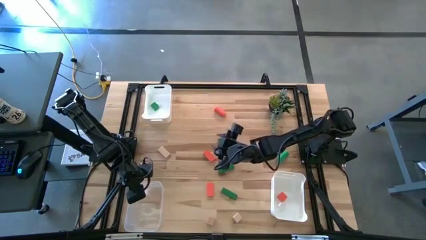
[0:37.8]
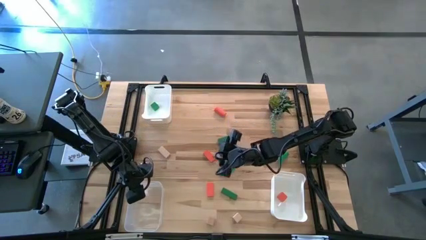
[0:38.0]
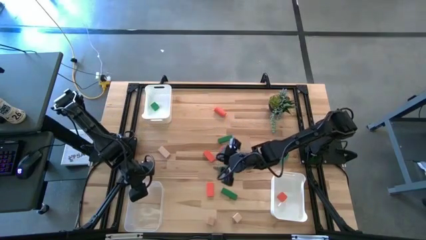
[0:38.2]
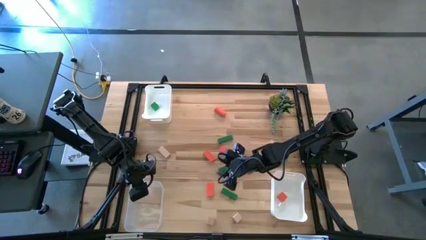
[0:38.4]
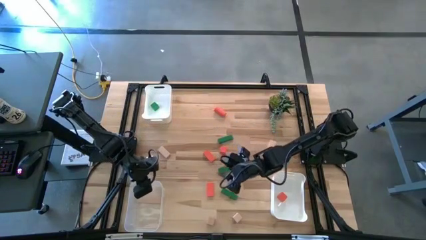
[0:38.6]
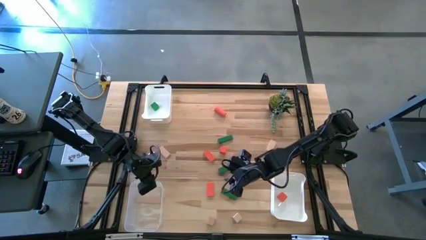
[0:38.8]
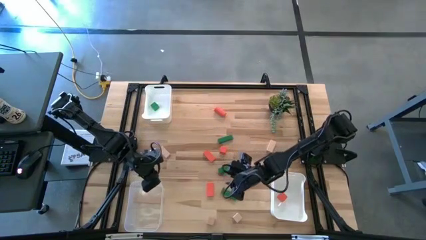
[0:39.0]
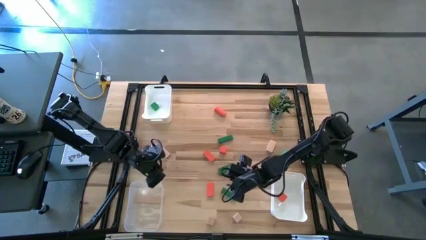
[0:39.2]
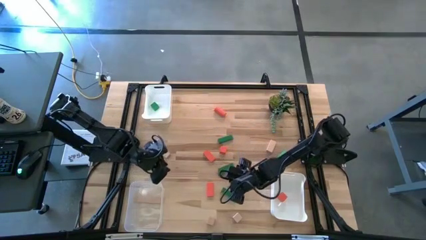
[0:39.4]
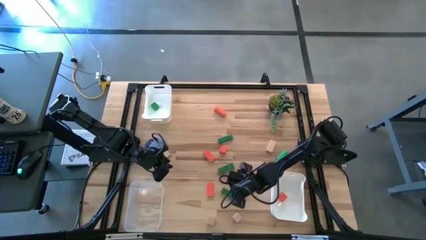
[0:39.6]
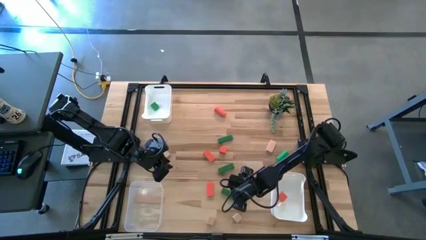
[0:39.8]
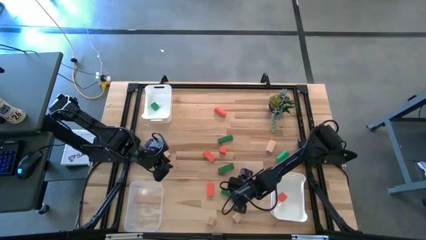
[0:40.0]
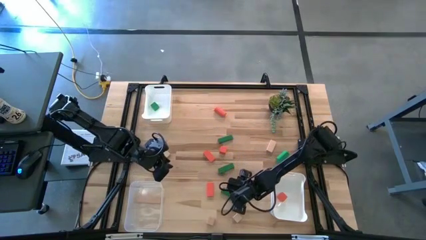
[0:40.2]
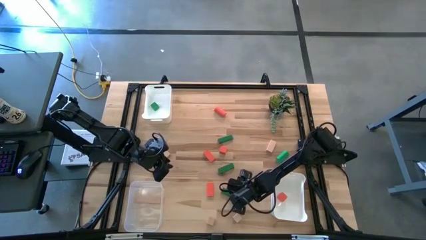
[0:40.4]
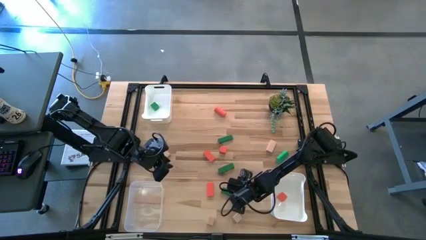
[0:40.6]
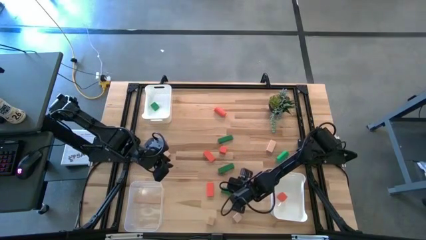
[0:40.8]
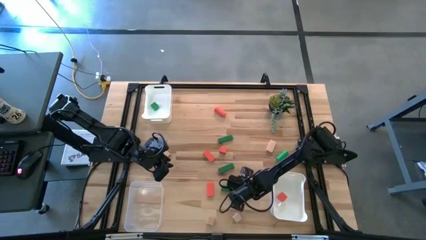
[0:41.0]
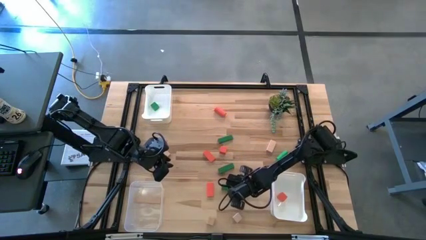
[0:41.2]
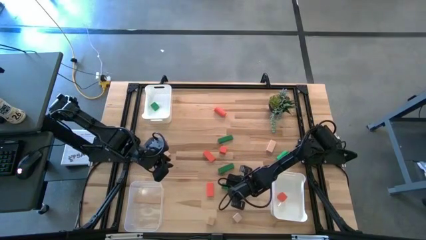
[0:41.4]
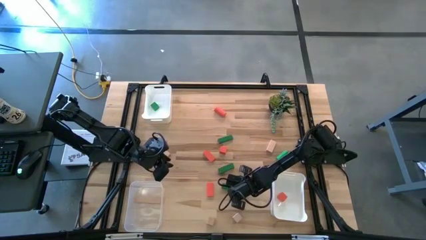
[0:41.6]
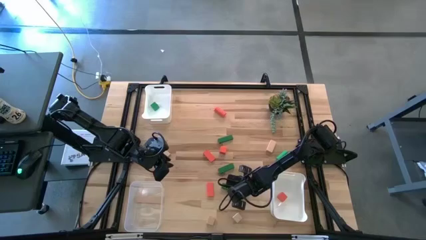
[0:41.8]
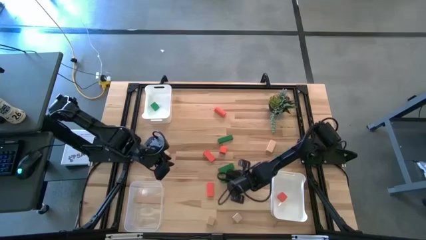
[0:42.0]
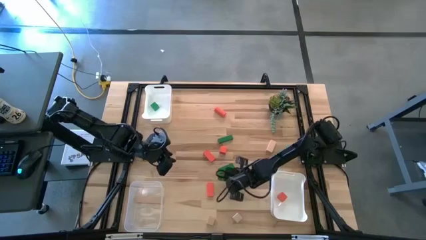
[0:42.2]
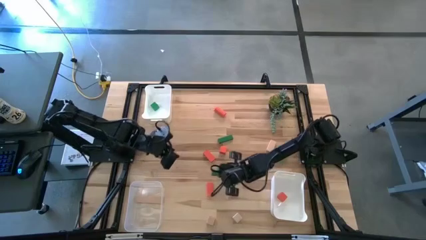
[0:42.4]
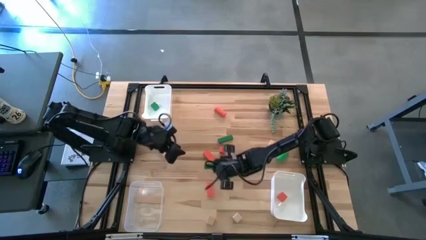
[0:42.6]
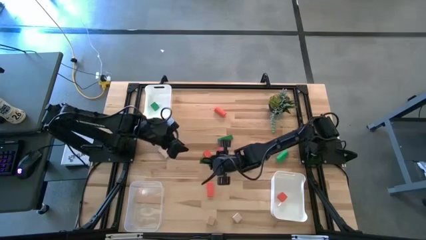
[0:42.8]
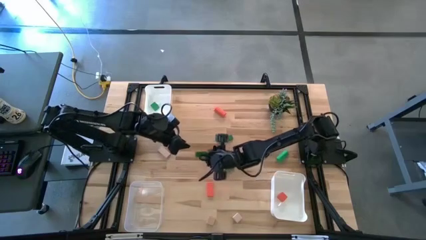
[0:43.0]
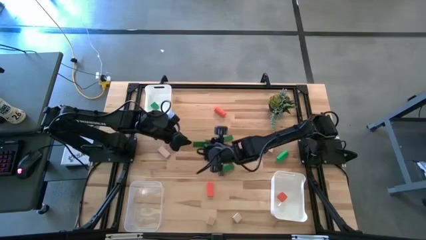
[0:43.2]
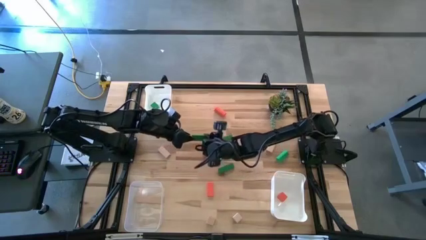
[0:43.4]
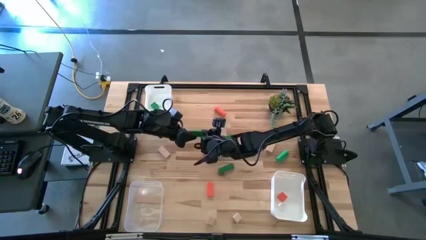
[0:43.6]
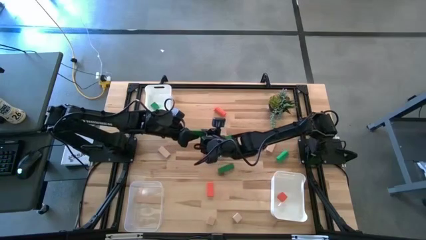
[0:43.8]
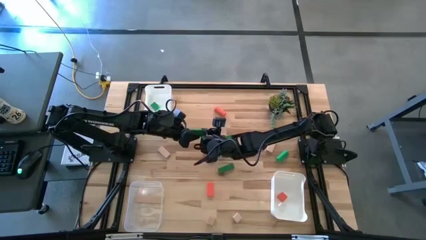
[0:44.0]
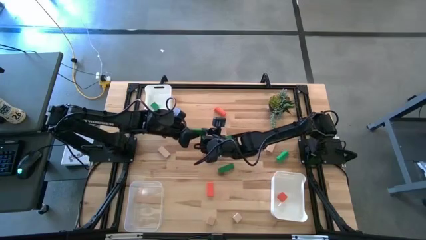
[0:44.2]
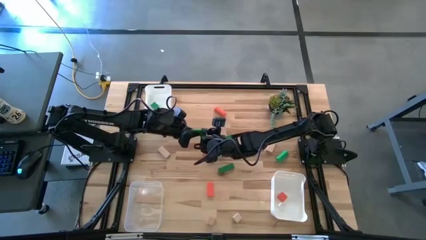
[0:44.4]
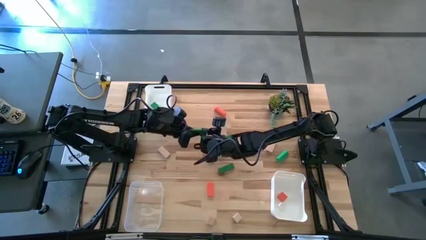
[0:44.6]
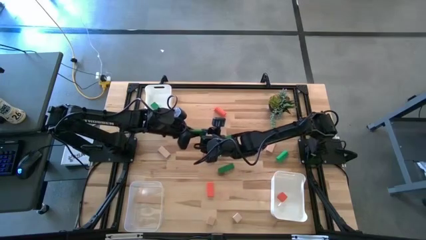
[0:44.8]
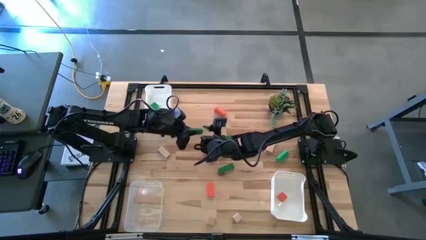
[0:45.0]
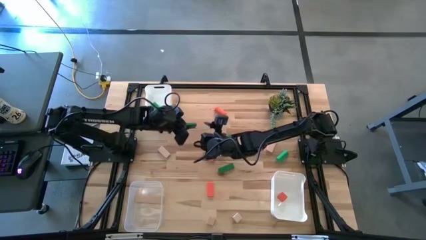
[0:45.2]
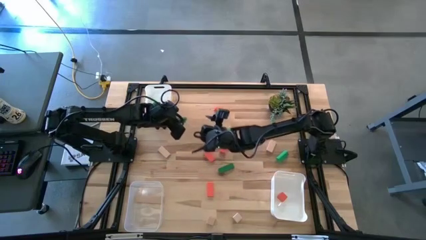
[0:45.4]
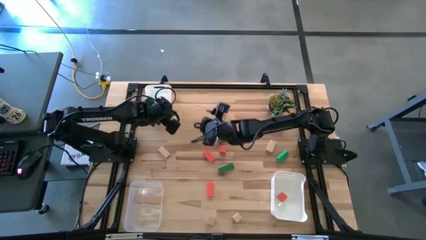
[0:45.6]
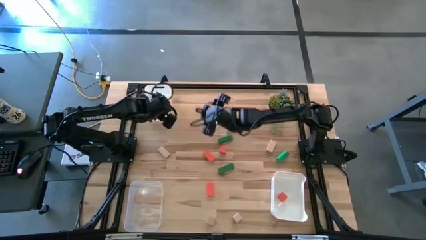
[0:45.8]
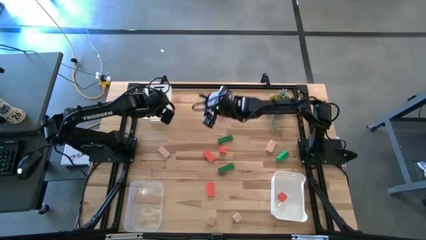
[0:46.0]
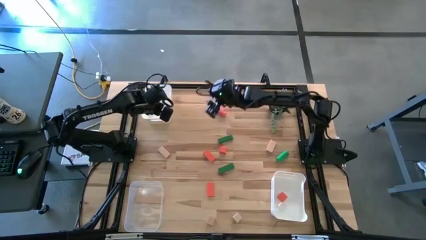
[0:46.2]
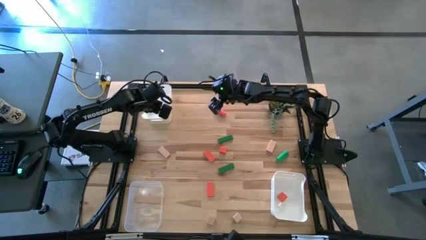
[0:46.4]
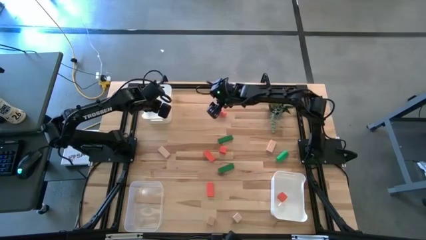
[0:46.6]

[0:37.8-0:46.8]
Task: Sort & place blocks by color
Put the green block into the top white bin

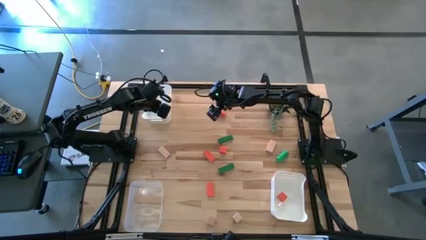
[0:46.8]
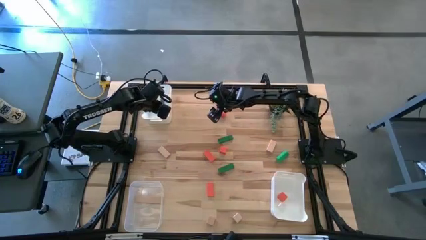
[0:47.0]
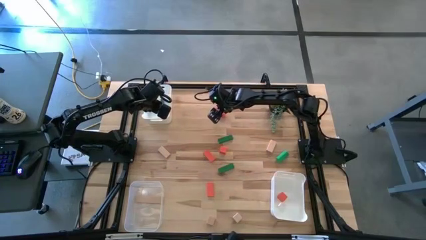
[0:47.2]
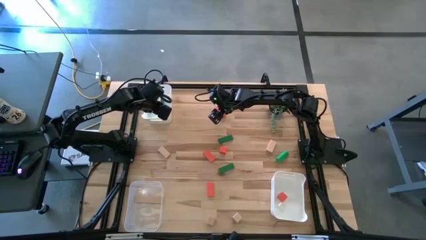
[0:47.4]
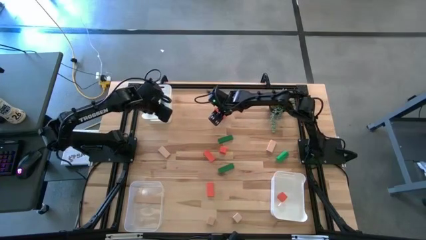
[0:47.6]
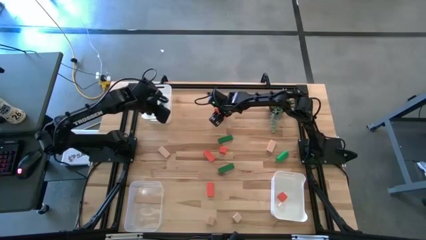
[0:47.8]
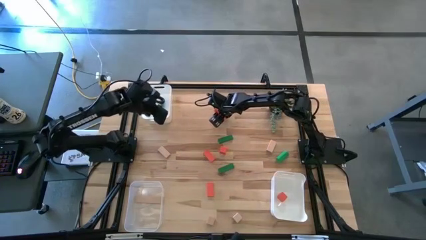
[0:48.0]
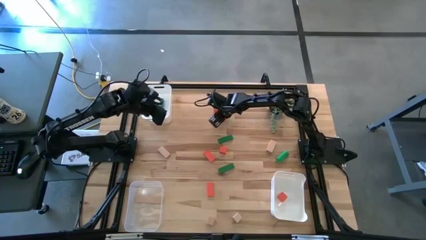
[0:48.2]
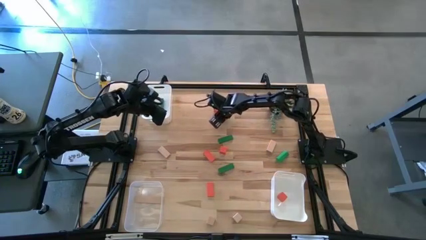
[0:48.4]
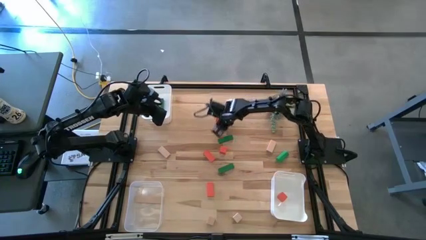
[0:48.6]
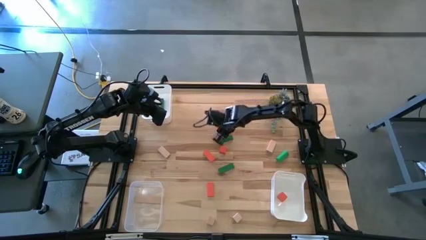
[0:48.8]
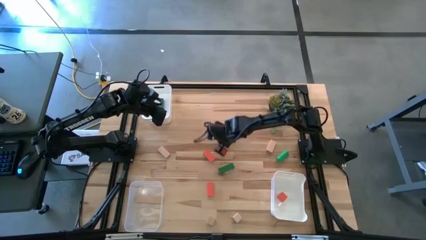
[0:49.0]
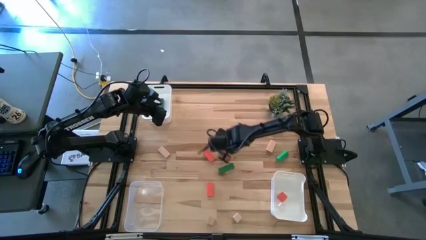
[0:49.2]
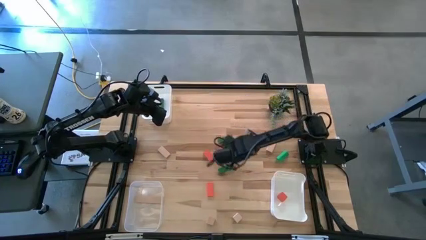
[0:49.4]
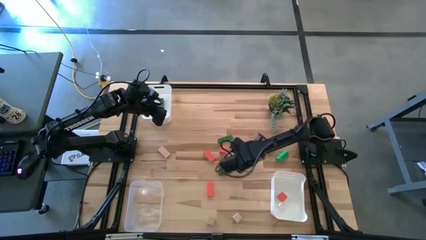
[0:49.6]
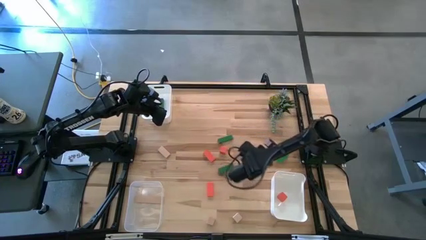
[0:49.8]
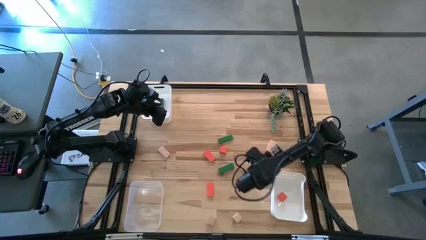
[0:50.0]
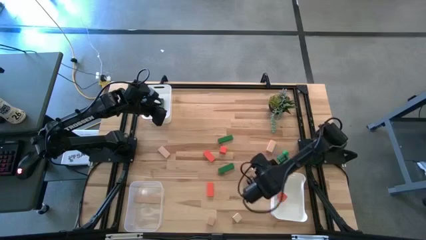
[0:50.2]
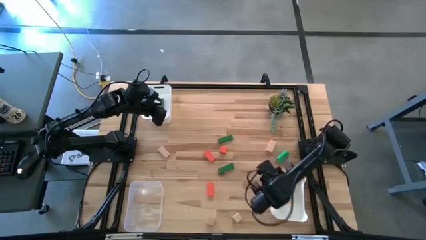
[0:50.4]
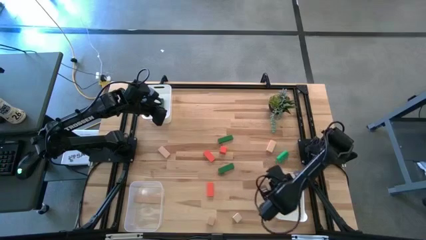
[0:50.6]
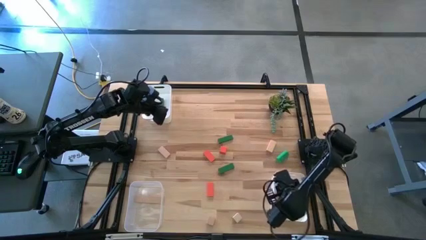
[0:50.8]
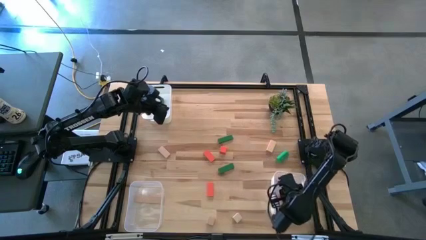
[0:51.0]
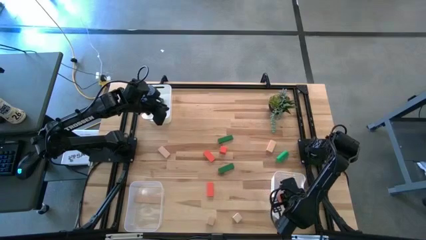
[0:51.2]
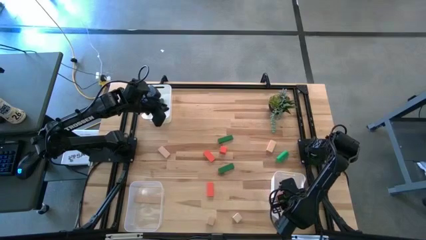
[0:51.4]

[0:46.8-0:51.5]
Put the orange block into the bottom white bin

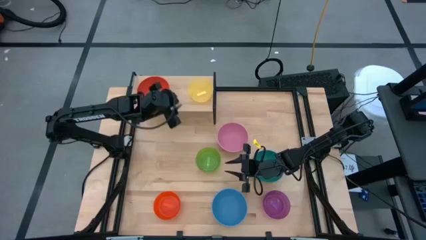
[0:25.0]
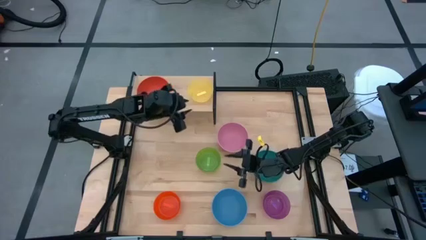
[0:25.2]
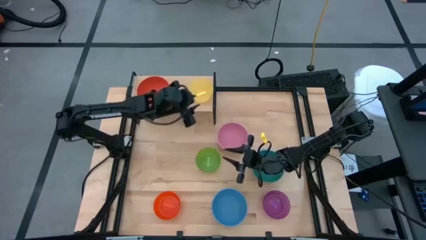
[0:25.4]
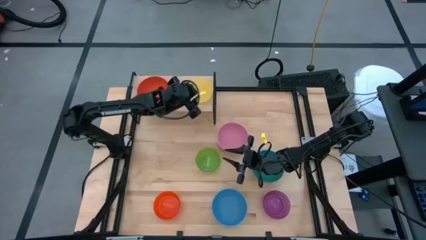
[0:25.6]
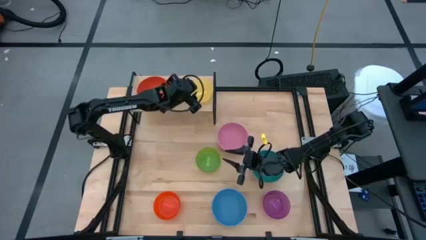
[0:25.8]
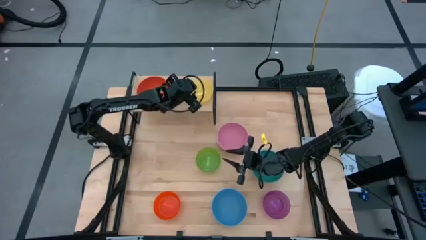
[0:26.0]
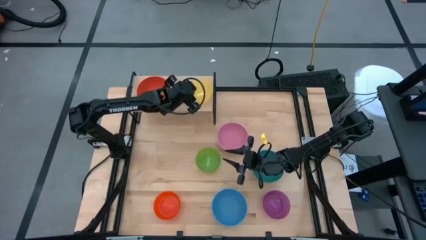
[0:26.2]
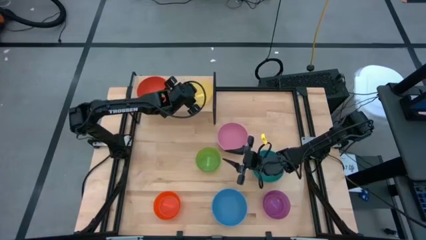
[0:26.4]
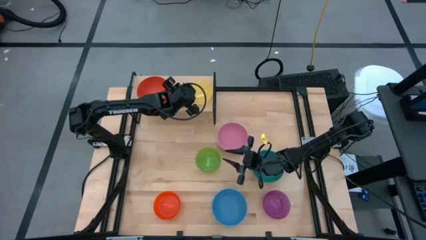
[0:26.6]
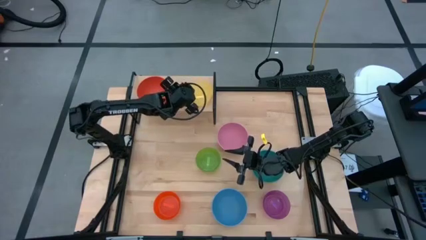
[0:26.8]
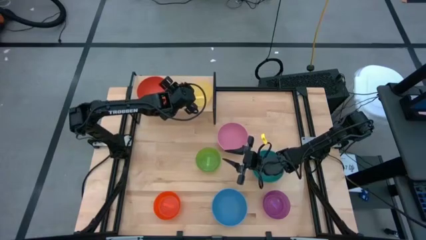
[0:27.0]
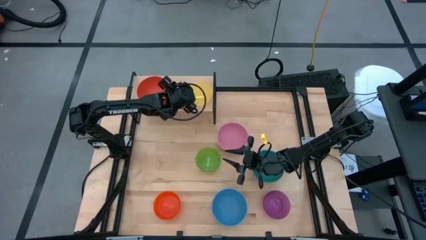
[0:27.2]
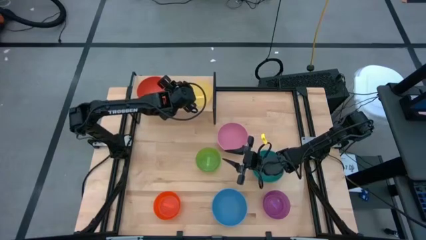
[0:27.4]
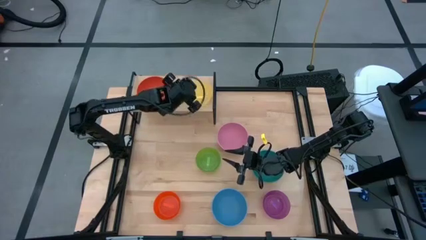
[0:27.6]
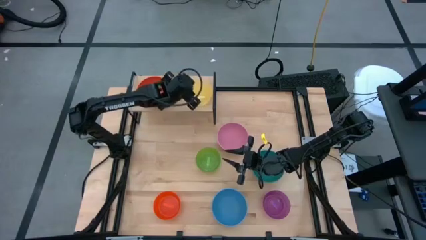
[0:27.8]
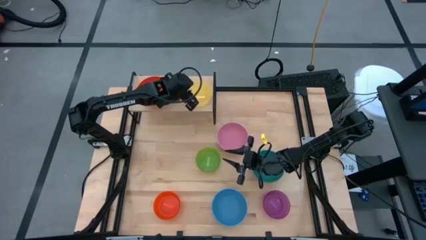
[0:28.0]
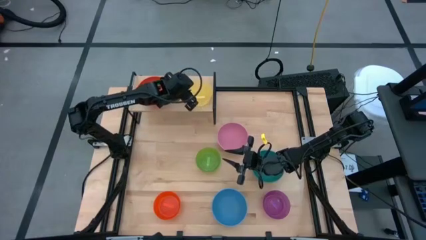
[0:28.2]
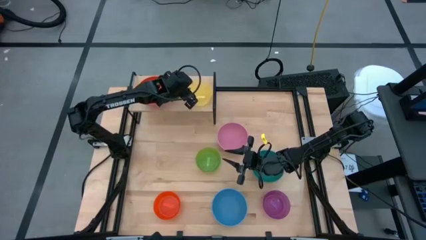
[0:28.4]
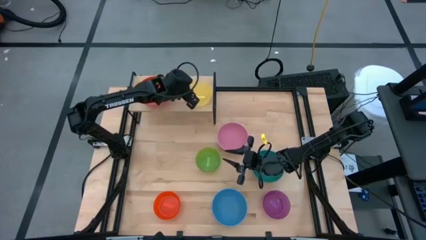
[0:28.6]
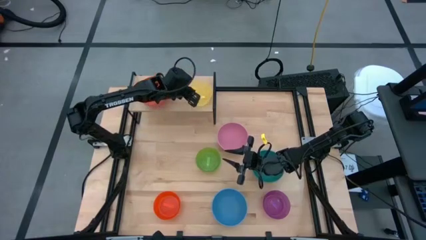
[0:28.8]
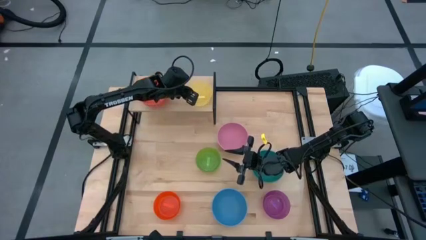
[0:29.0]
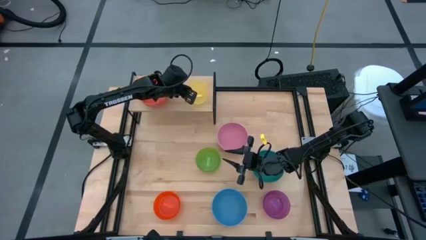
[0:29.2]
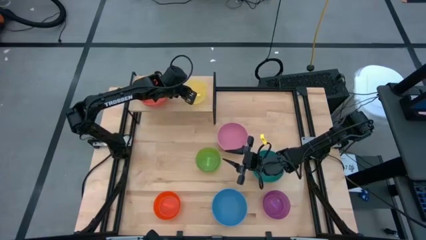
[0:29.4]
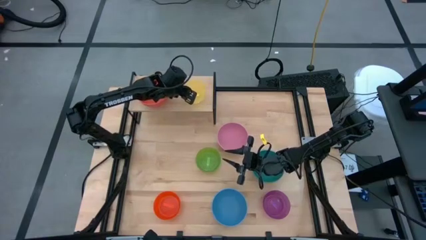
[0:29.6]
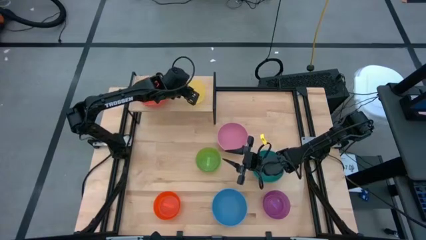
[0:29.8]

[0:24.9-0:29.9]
Task: Place and stack bowls onto a shelf
Adjust the yellow bowl on the shelf
